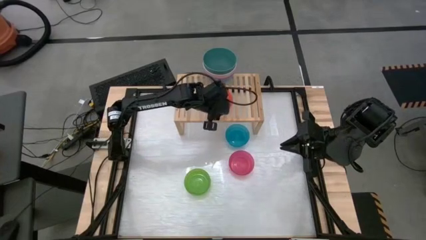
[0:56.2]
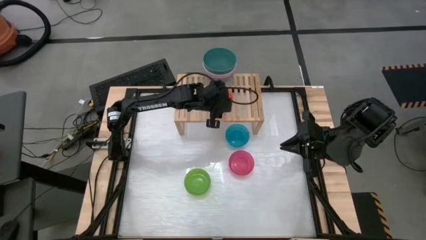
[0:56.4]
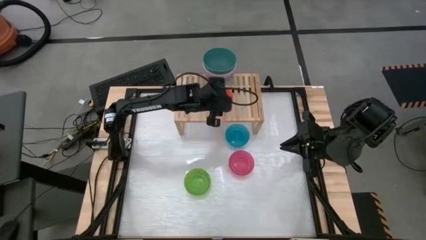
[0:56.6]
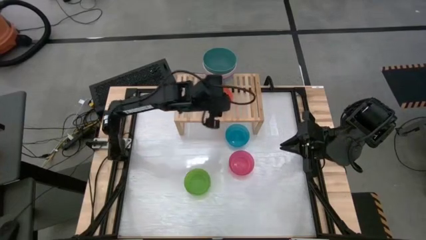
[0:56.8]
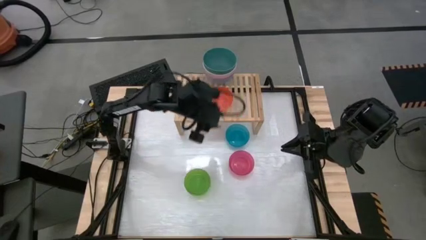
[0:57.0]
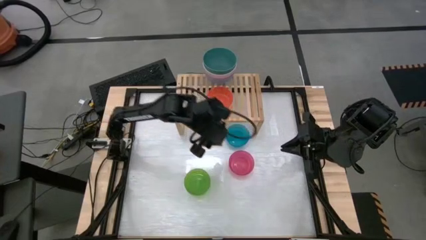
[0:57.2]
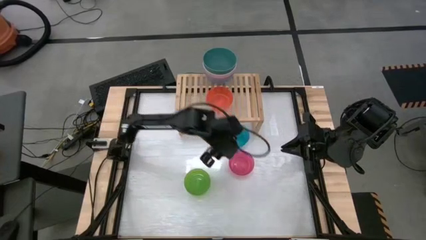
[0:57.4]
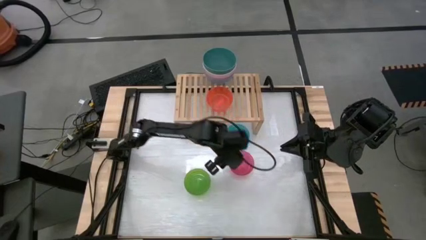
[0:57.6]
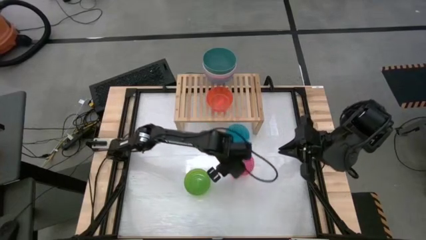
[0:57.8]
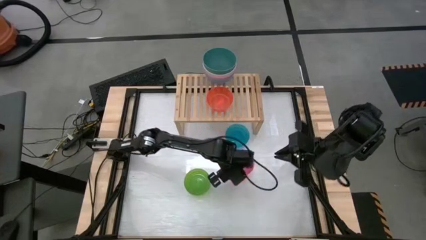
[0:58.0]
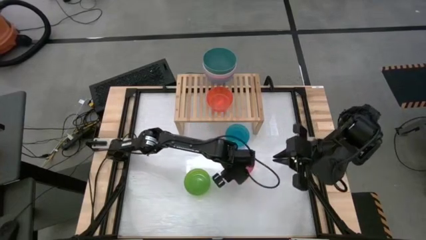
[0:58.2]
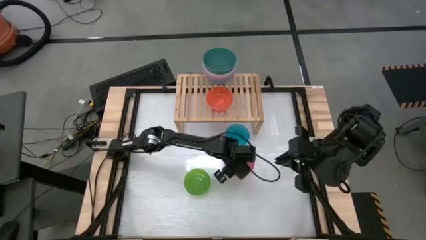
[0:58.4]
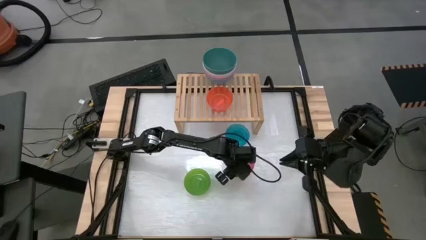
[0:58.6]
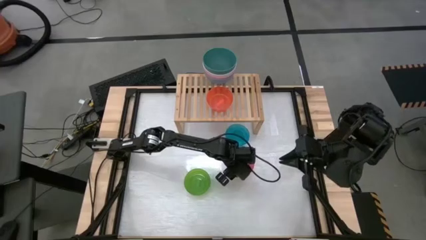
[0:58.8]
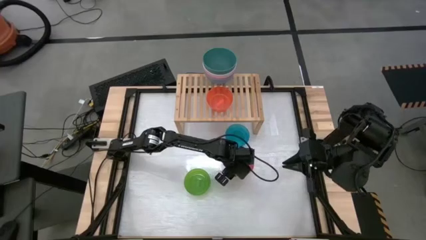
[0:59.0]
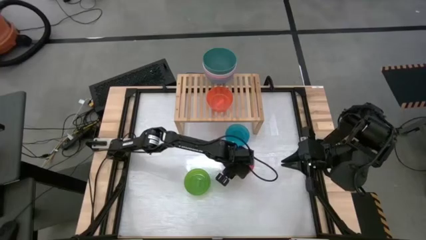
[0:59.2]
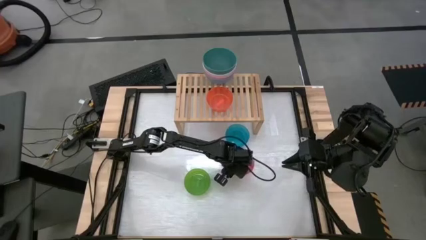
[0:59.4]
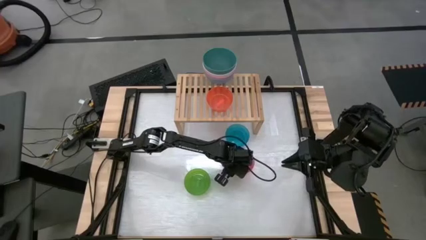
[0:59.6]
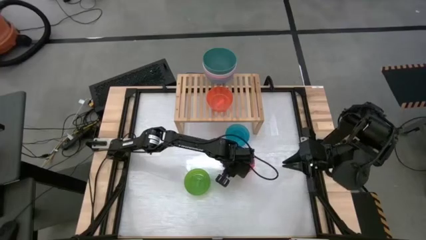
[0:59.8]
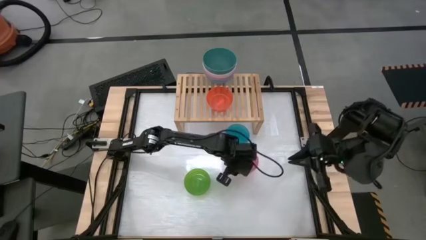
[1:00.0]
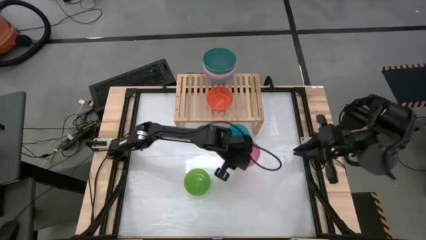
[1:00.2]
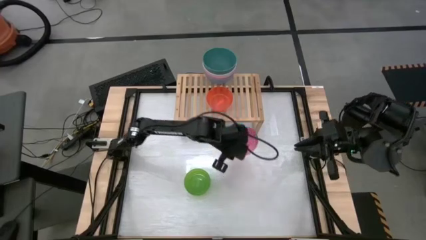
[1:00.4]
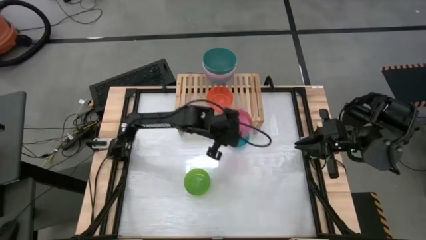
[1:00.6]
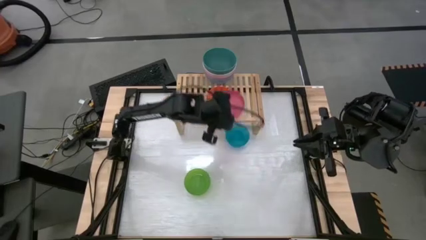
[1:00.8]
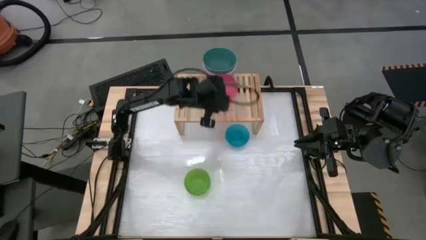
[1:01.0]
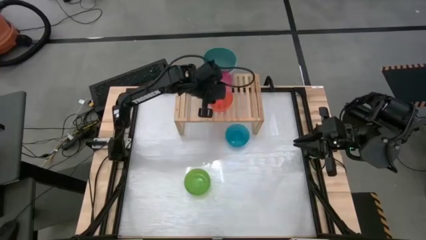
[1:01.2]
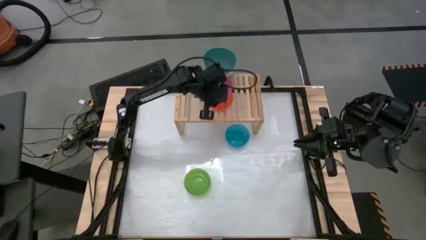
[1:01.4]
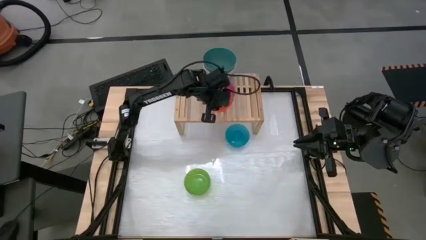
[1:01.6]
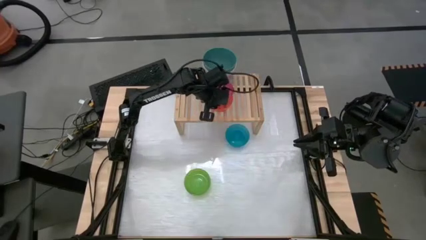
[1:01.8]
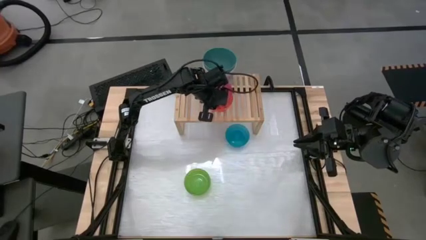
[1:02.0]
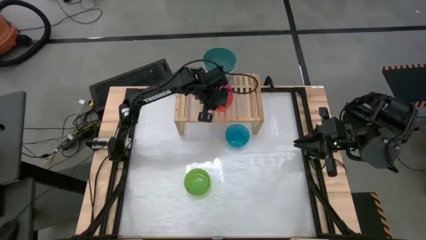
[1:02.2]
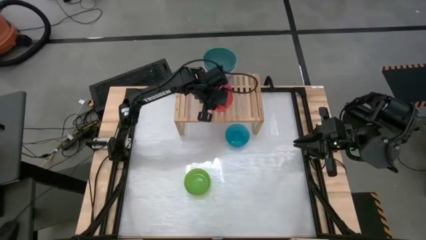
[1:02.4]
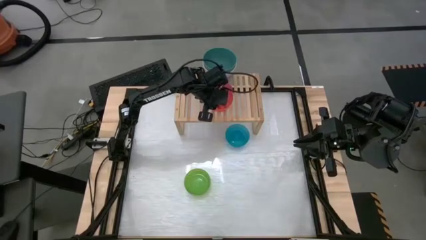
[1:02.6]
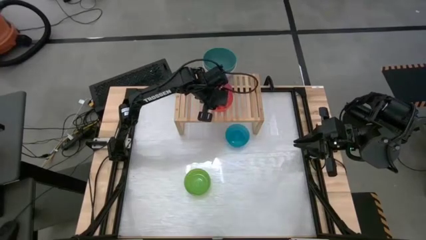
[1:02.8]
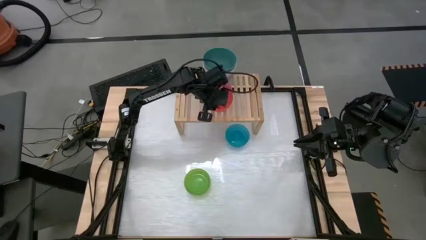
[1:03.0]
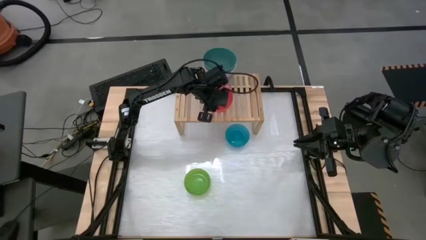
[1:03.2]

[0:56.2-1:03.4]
Task: Place and stack bowls onto a shelf
Stack the pink bowl on top of the orange bowl on the shelf

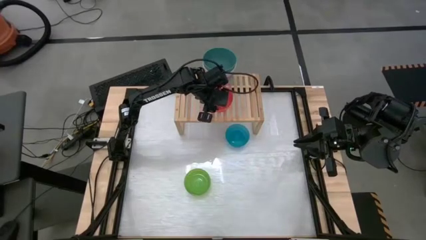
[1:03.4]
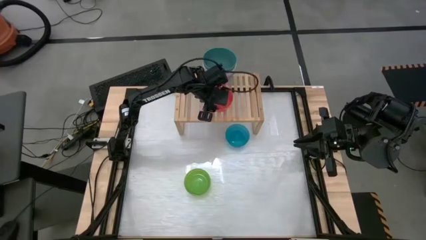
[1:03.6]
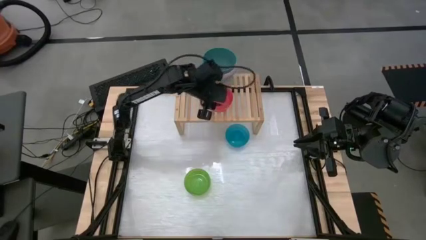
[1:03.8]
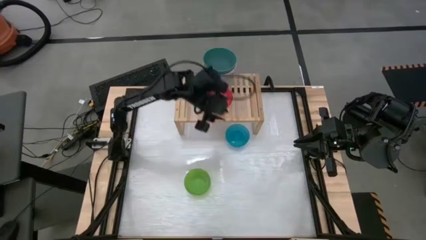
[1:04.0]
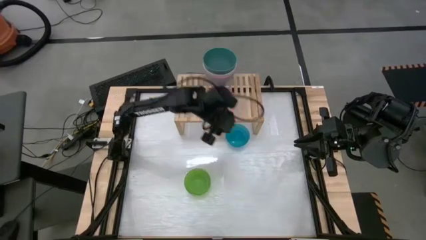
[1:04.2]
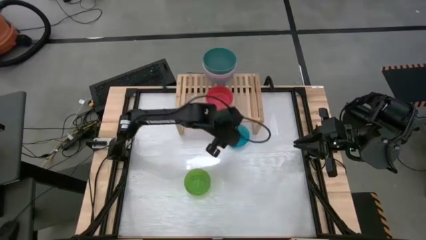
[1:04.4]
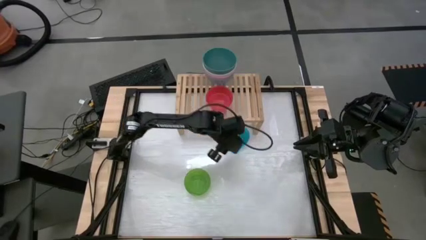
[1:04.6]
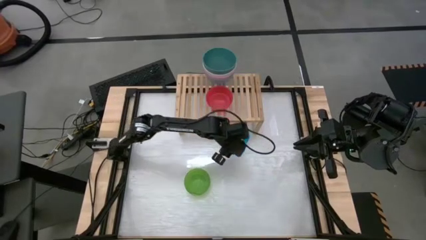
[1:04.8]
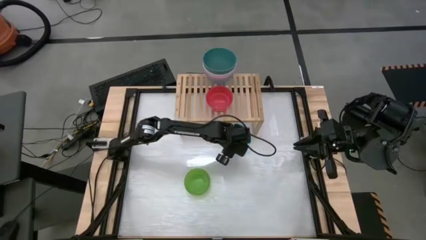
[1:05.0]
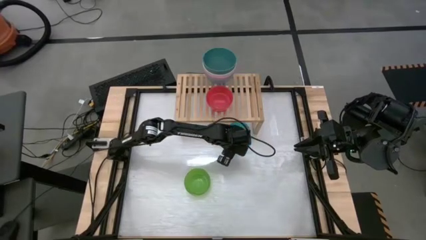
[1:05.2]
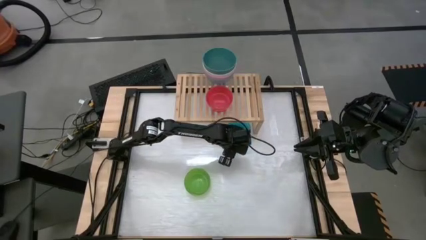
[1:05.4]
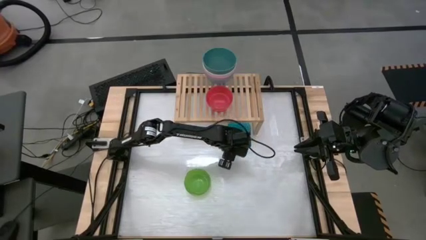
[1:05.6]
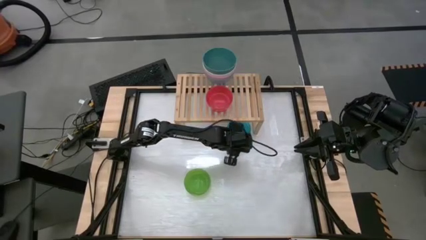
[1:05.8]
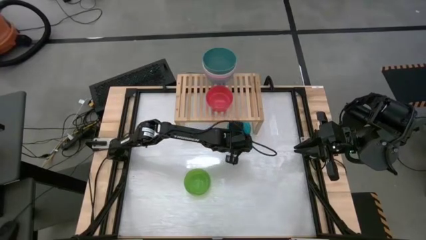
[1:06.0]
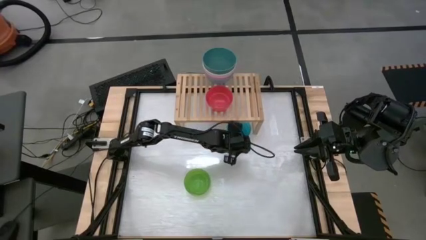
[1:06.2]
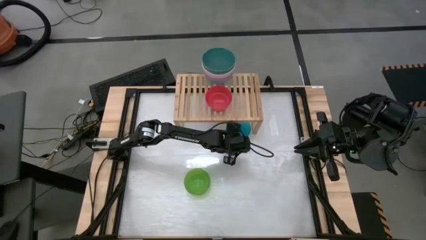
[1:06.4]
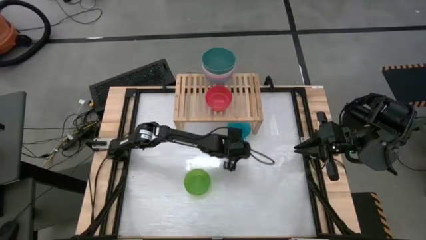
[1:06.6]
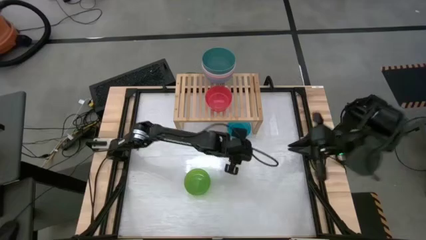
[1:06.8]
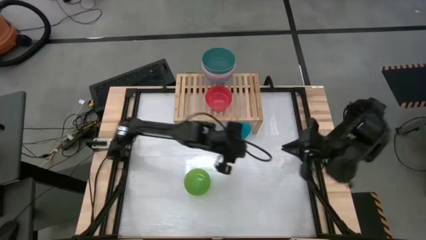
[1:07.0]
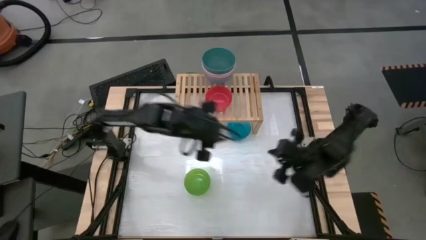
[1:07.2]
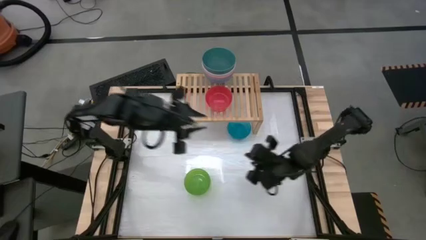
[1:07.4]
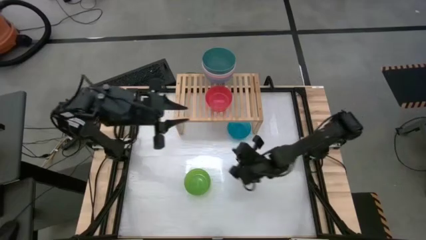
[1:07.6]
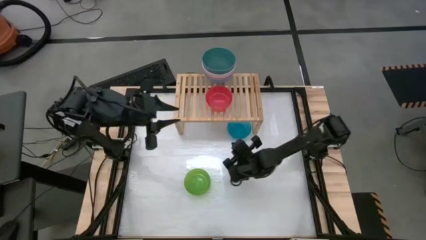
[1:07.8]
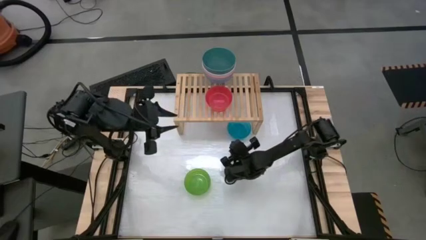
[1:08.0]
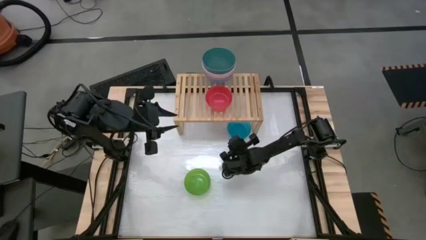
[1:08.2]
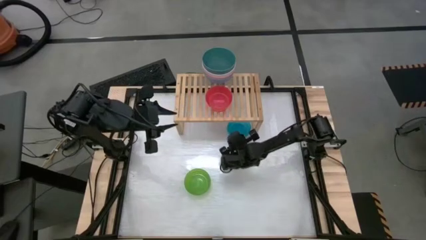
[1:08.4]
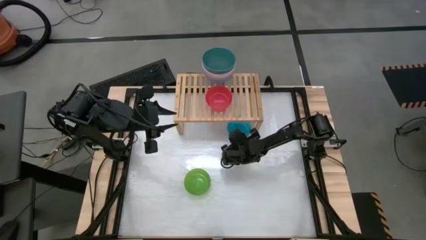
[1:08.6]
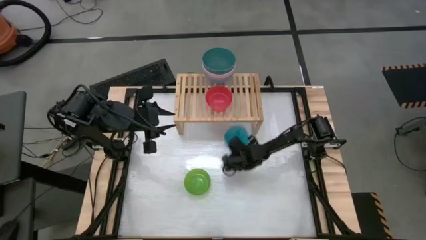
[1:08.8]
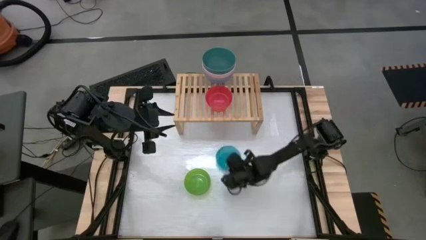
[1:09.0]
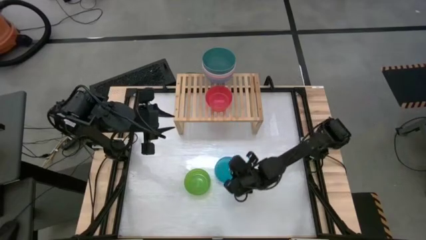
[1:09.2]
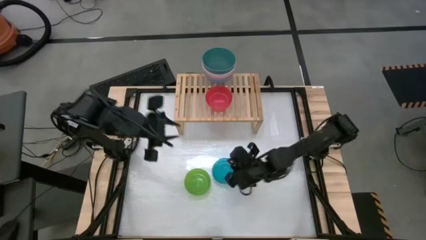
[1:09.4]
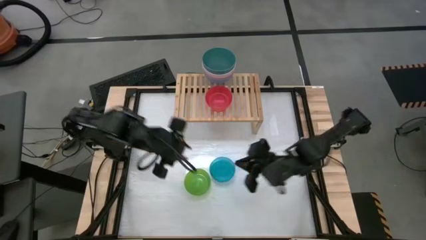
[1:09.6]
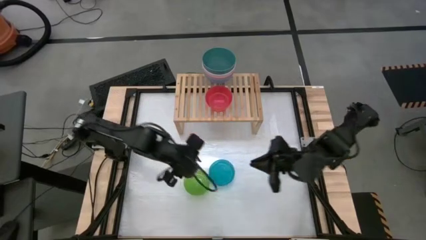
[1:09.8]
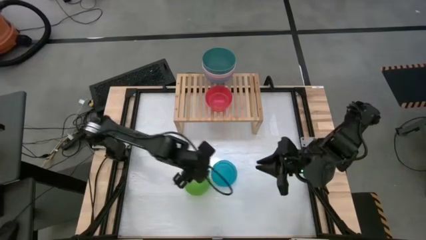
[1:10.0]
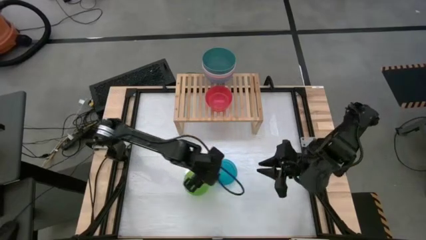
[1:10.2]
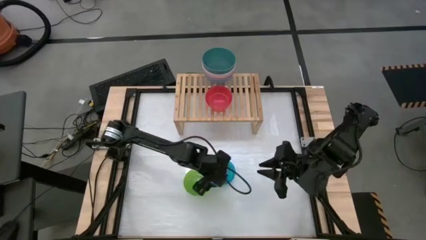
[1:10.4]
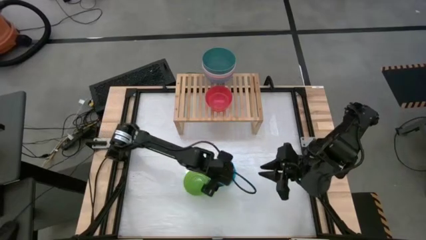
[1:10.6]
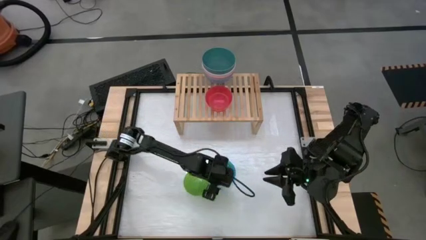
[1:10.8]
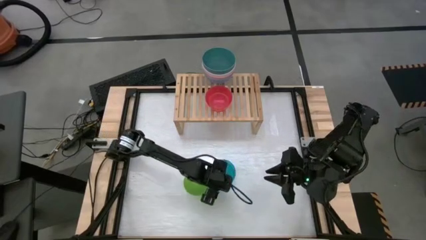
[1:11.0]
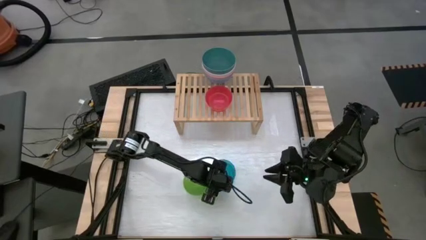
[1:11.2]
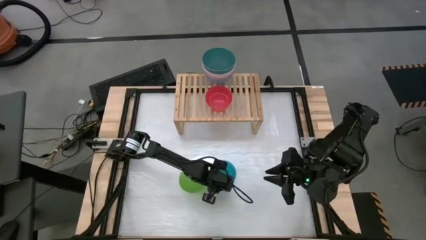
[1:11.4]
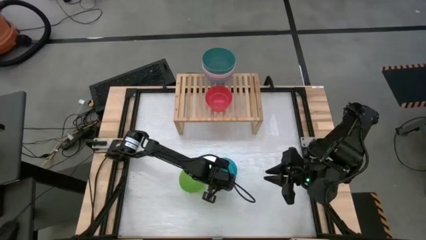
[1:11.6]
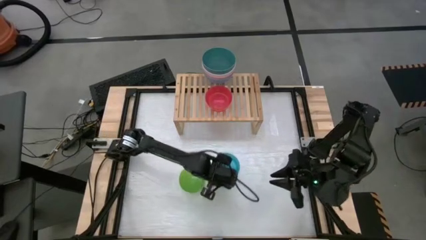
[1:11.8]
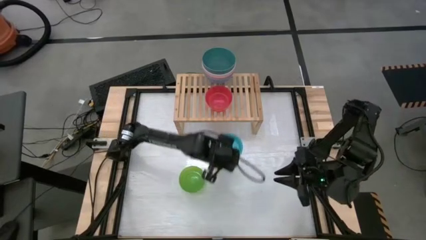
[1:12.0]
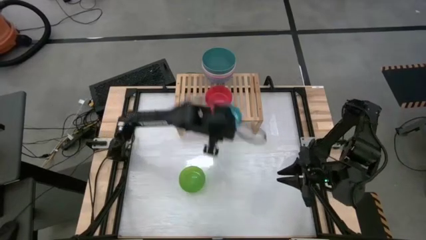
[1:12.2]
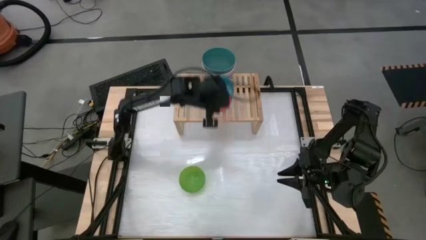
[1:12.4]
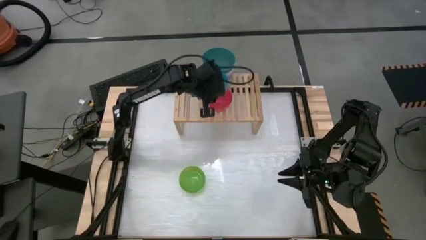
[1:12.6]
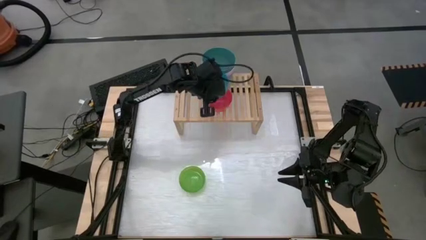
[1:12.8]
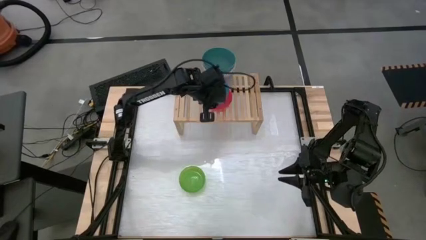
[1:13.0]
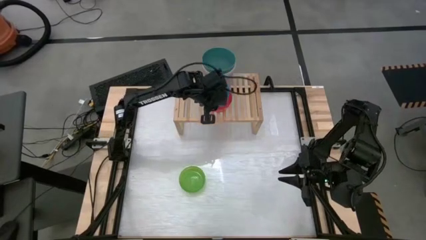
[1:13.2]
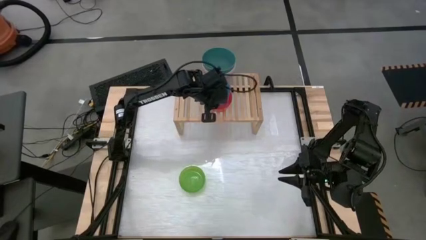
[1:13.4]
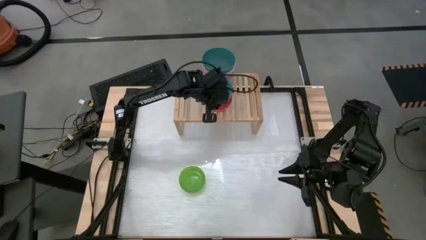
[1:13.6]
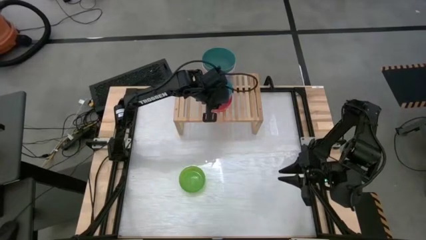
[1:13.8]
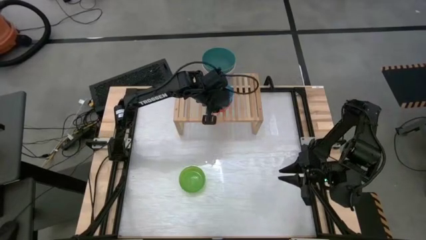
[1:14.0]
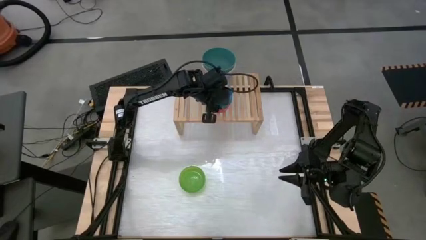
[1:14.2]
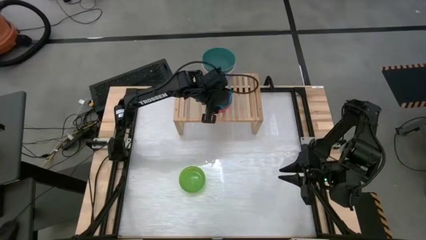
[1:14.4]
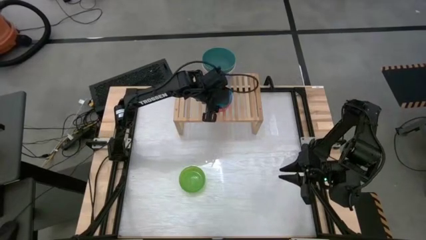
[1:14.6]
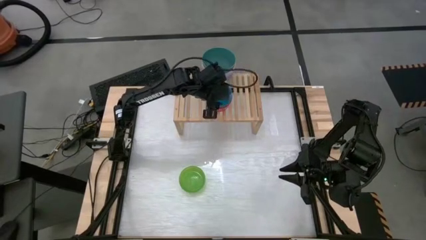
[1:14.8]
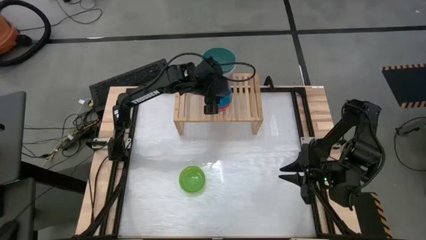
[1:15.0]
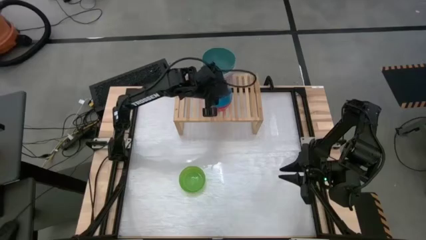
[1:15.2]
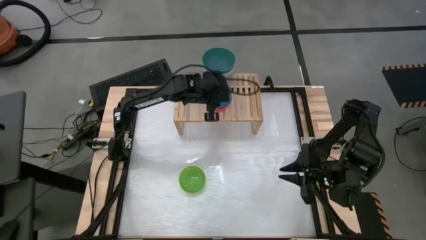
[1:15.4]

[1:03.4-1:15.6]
Stack the blue bowl on top of the pink bowl on the shelf
